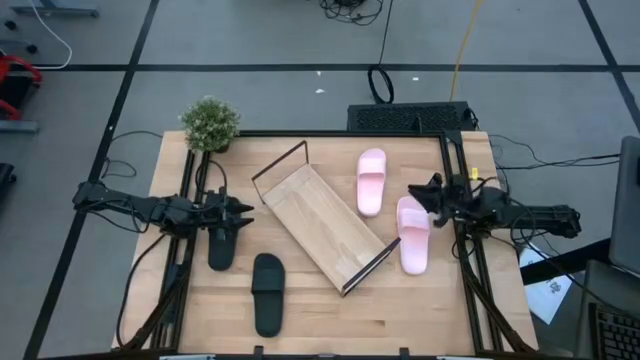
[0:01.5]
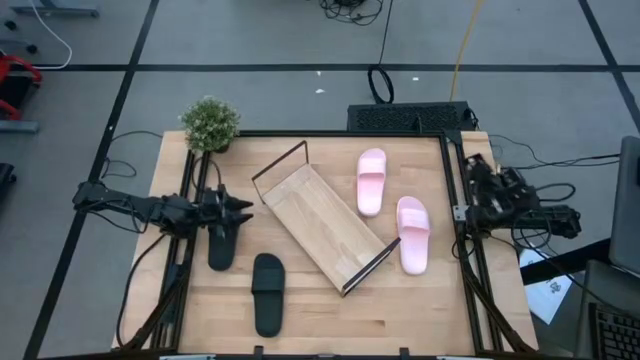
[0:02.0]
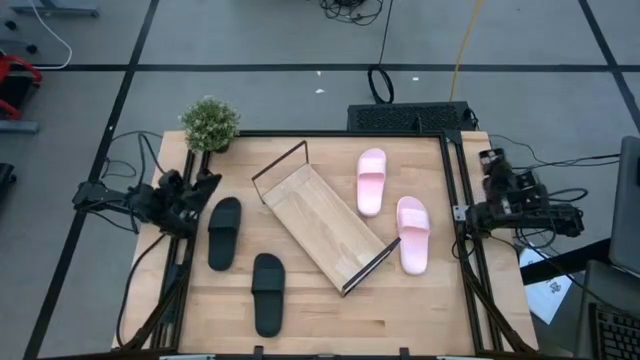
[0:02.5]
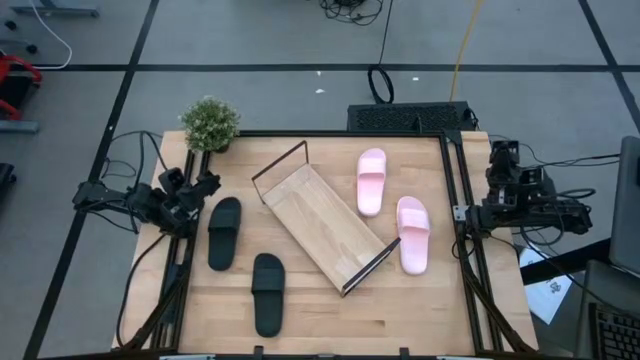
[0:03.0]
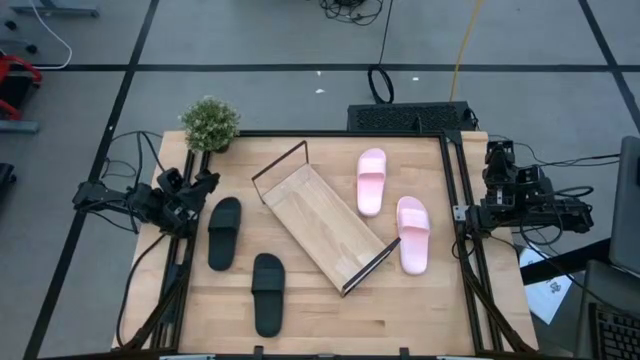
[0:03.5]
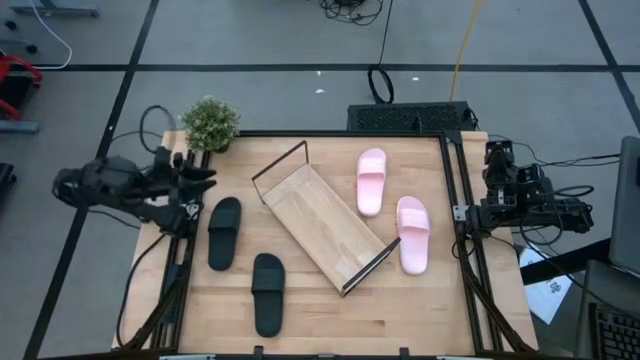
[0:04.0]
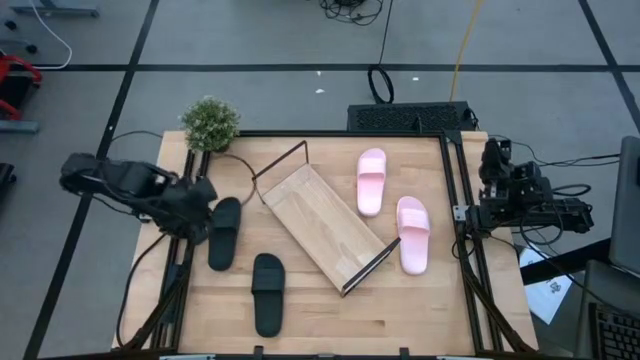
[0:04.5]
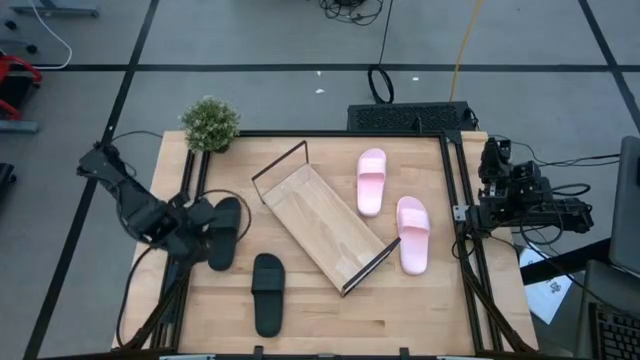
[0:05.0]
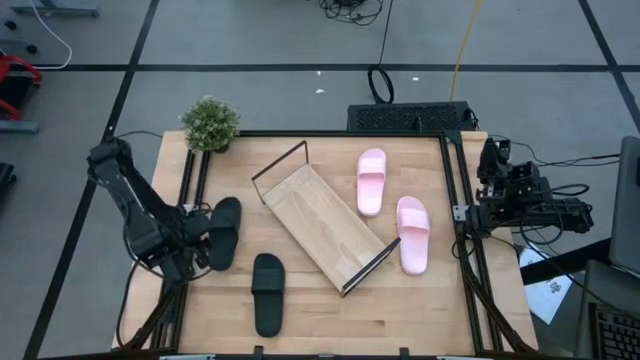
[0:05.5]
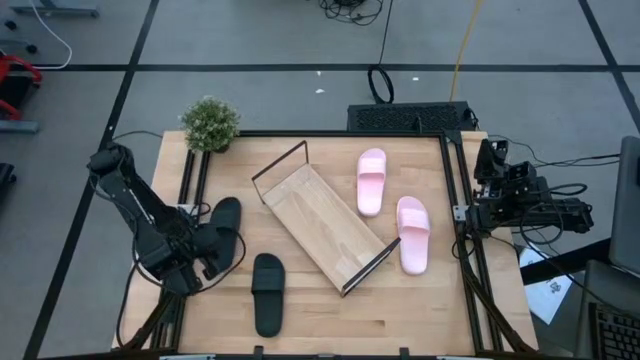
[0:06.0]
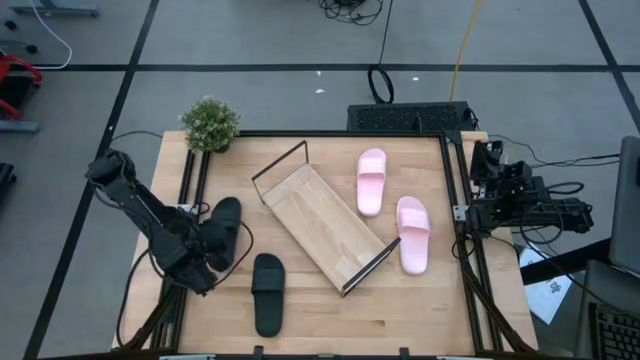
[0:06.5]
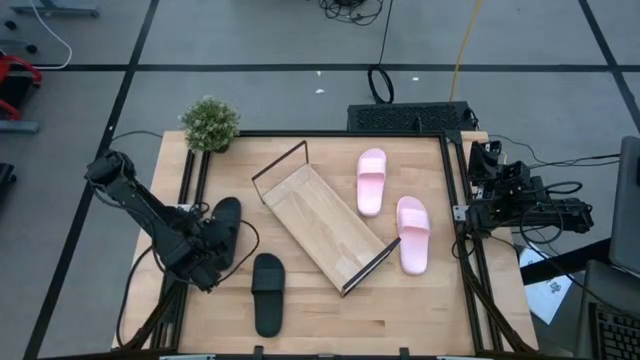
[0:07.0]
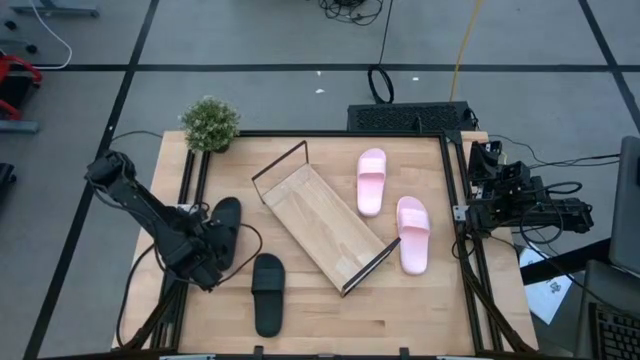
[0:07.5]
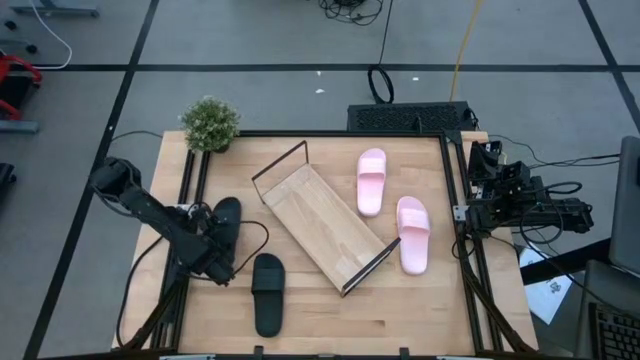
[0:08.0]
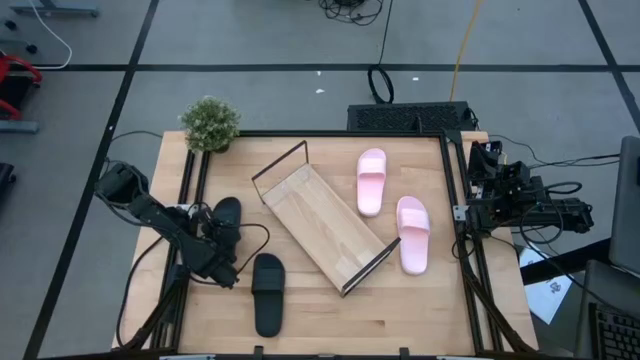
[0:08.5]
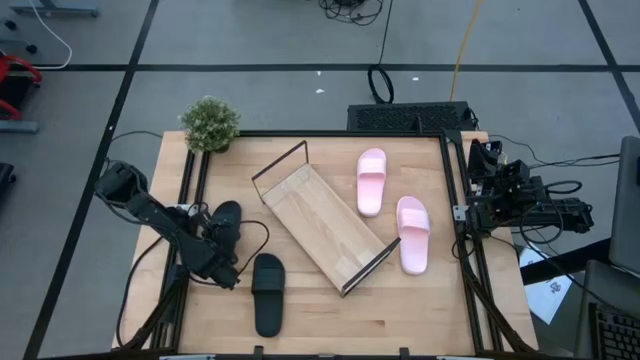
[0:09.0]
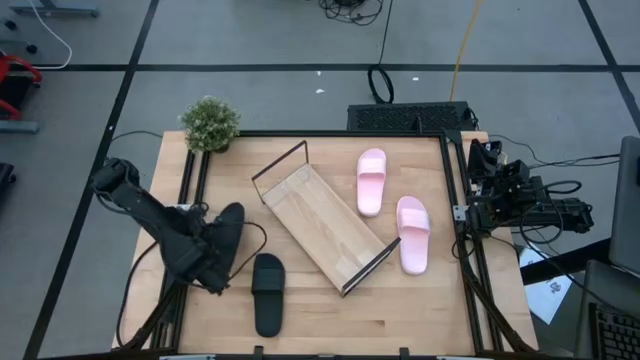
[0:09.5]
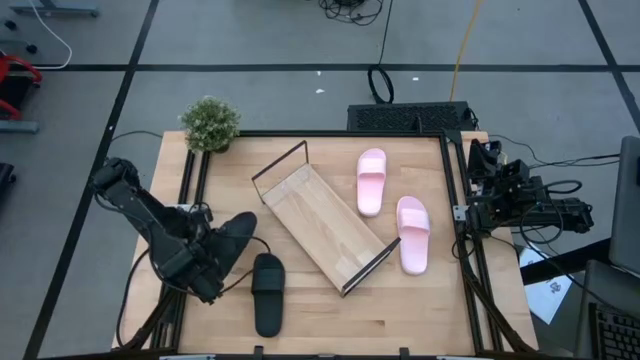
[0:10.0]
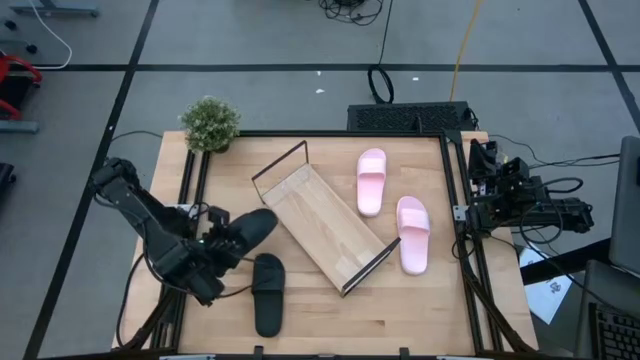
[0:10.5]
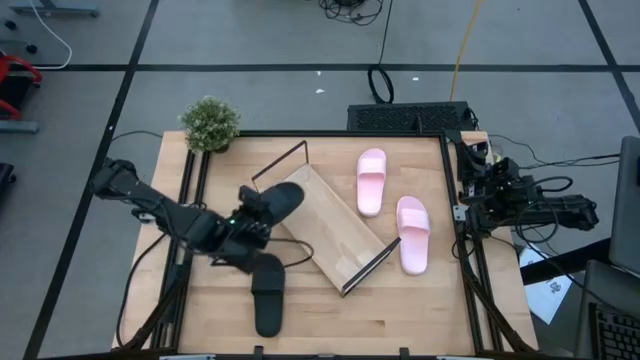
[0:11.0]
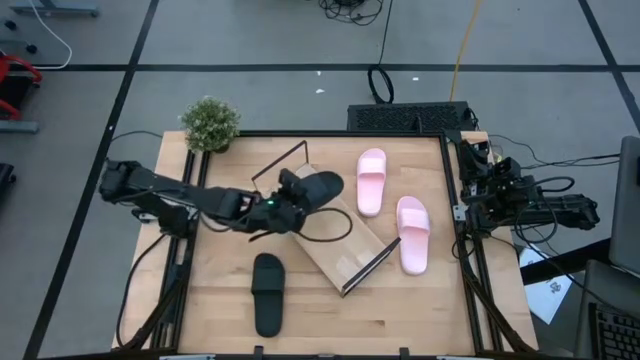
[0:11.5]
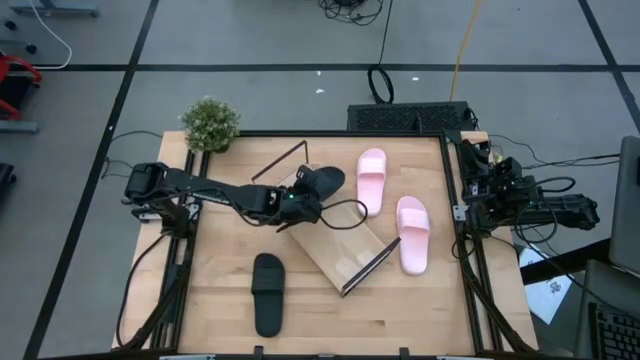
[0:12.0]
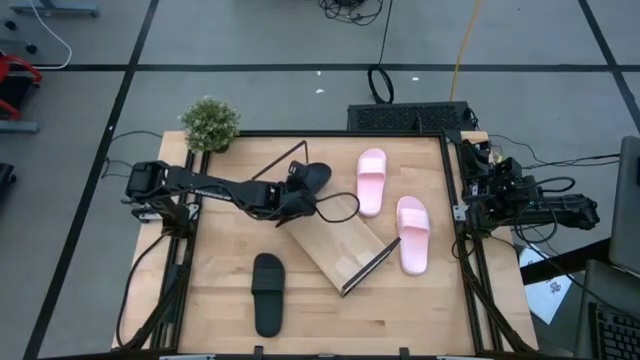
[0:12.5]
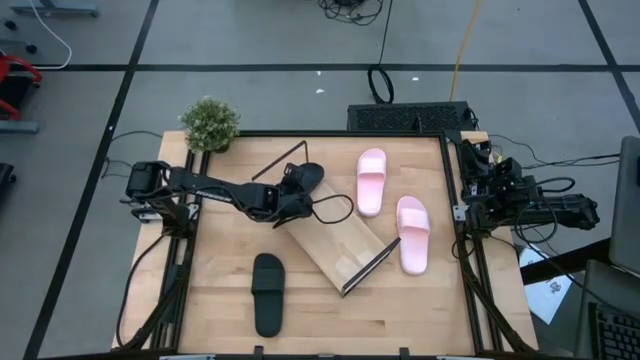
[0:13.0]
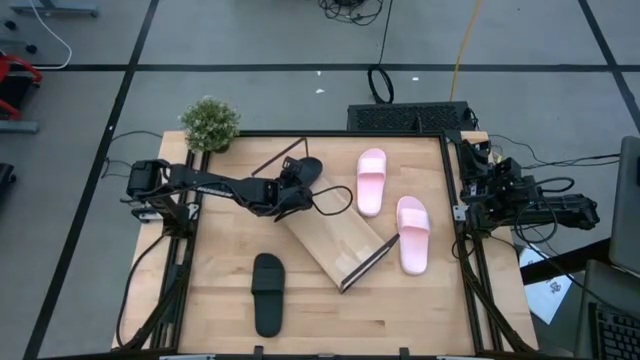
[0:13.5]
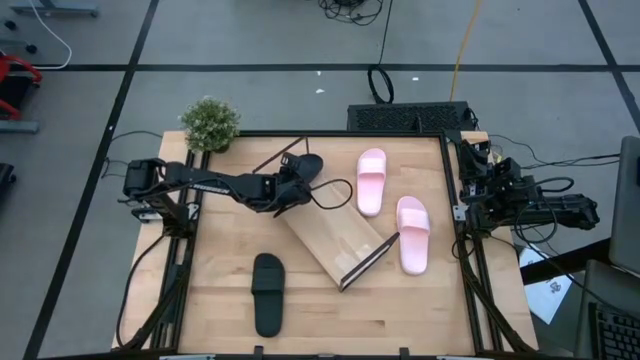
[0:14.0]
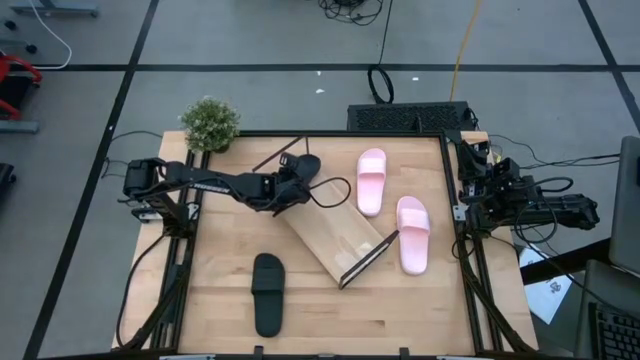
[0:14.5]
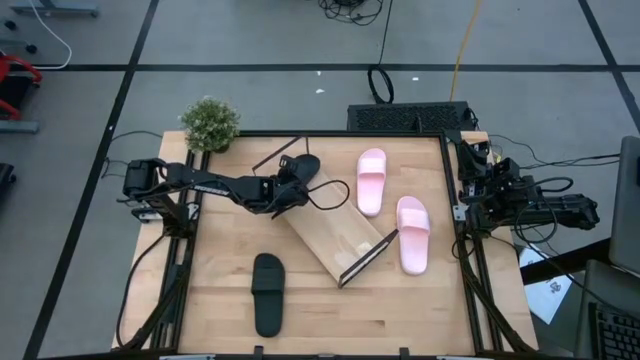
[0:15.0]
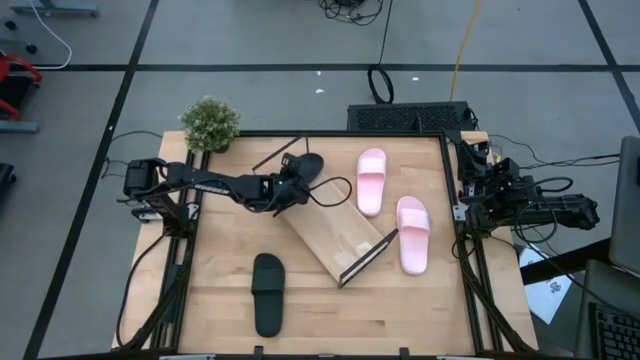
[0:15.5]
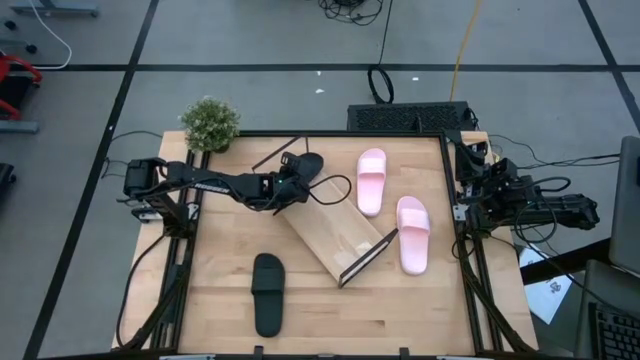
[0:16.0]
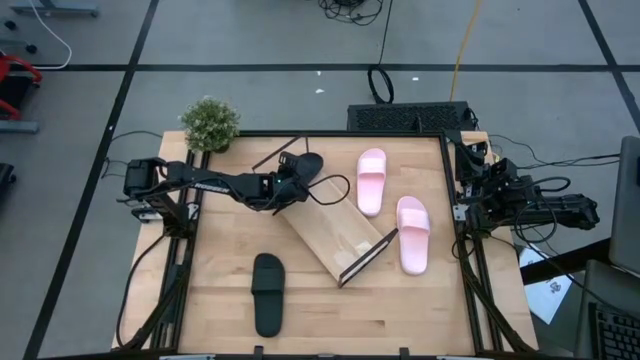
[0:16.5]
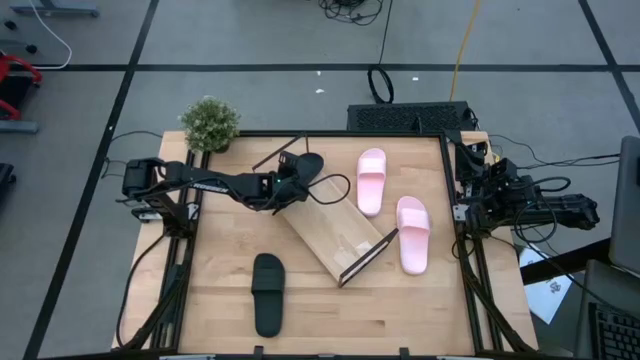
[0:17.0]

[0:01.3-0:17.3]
Task: Pick and place slides into the shelf
Put the left black slipper on the shelf
